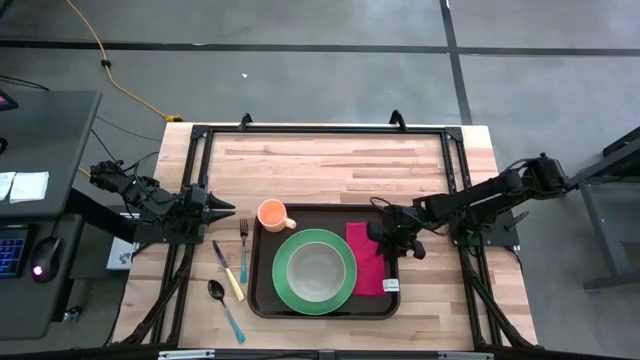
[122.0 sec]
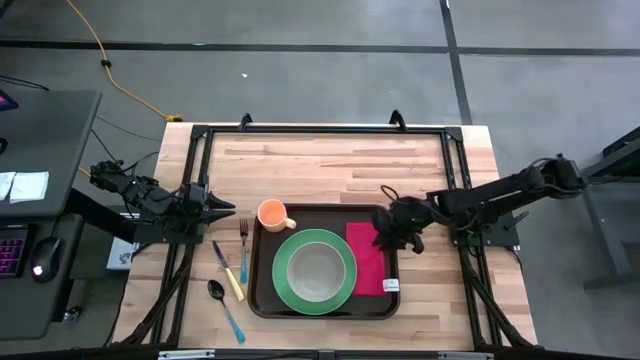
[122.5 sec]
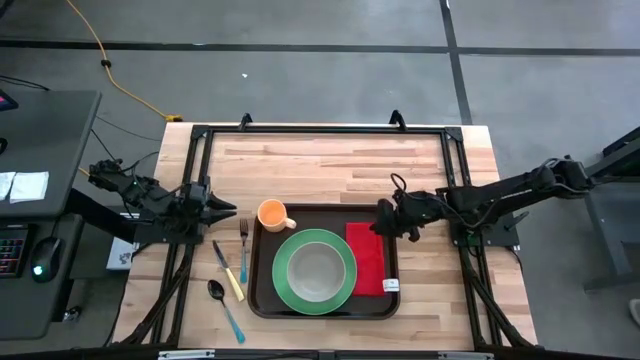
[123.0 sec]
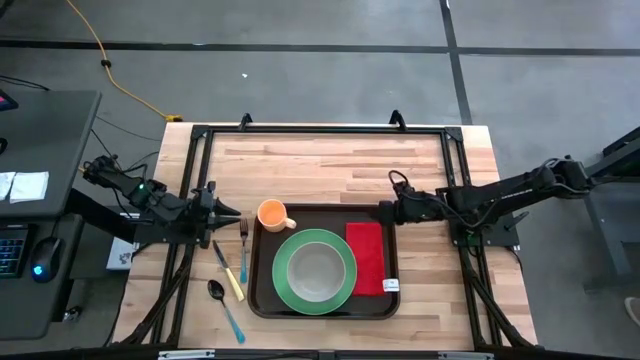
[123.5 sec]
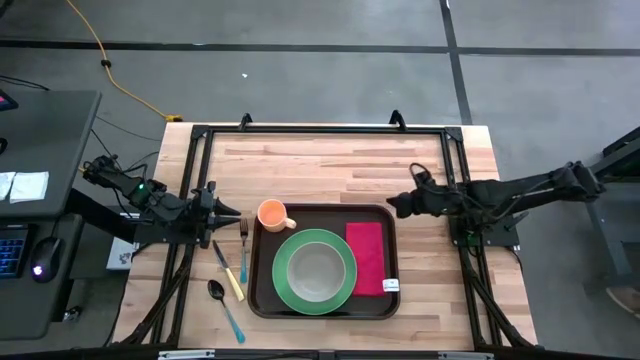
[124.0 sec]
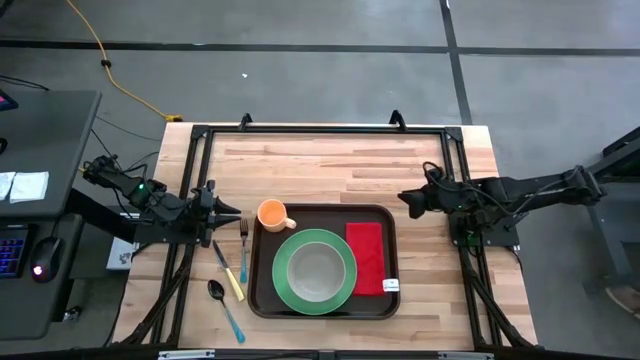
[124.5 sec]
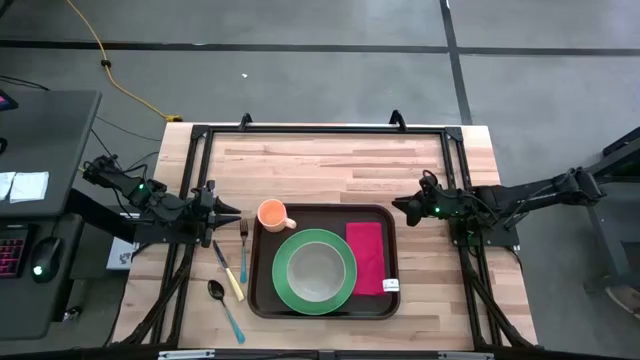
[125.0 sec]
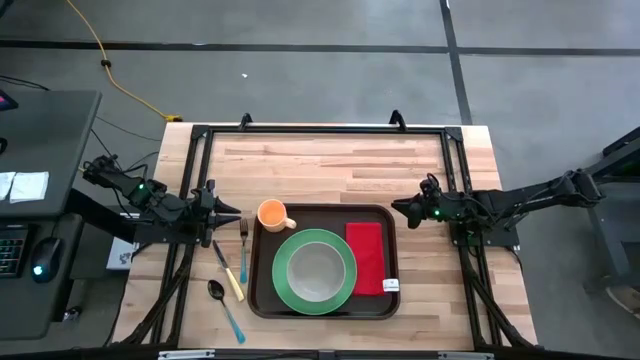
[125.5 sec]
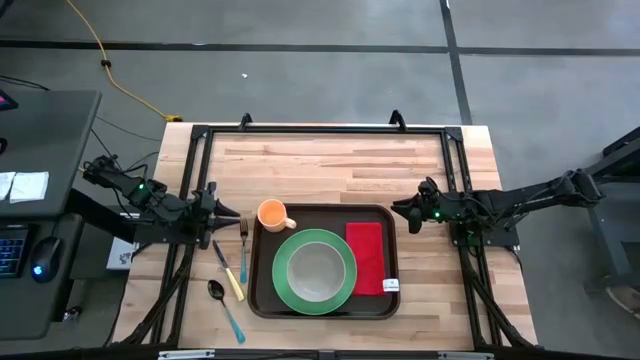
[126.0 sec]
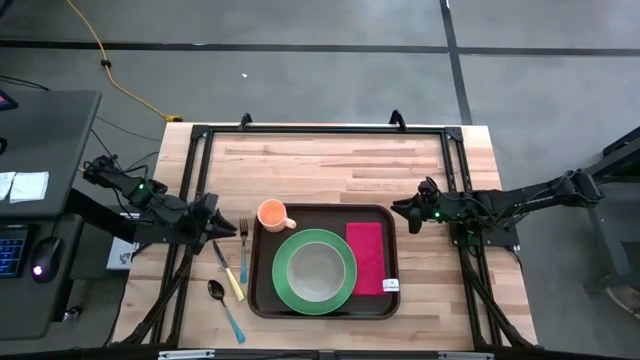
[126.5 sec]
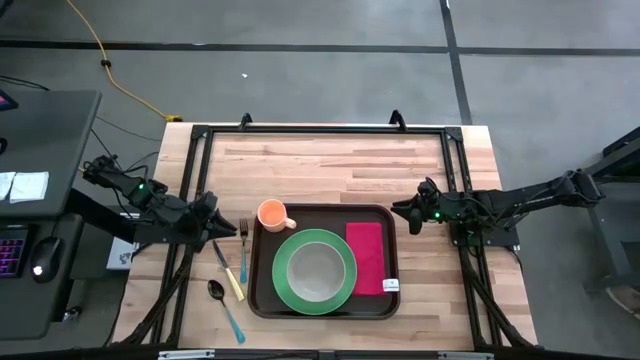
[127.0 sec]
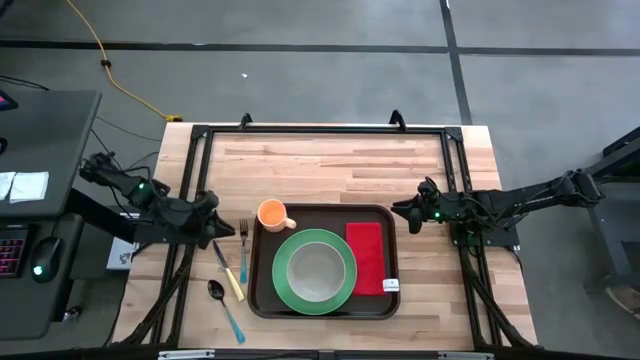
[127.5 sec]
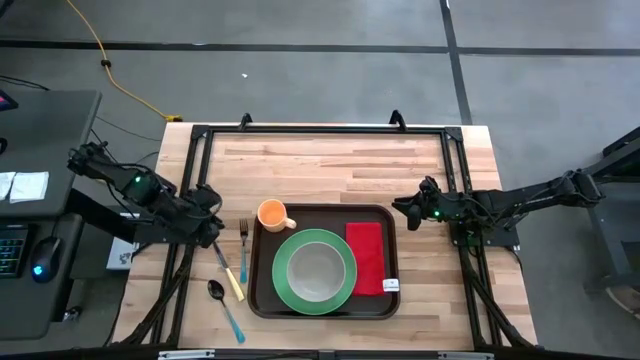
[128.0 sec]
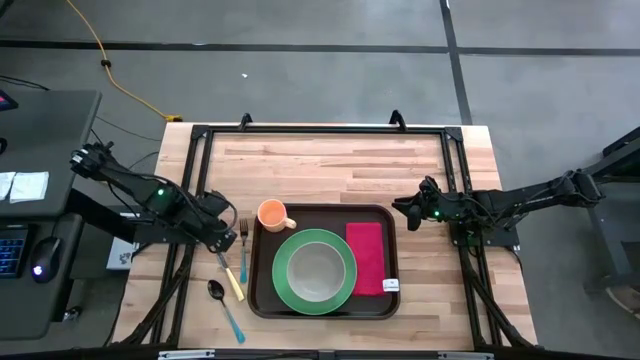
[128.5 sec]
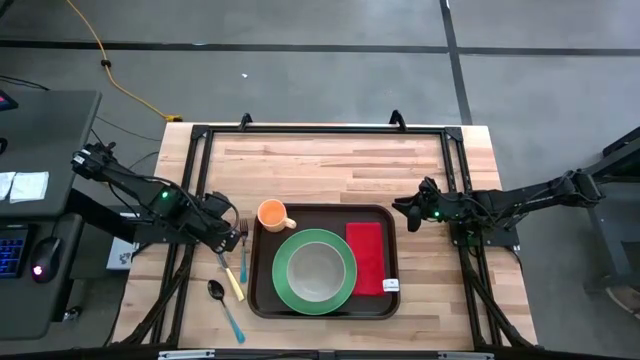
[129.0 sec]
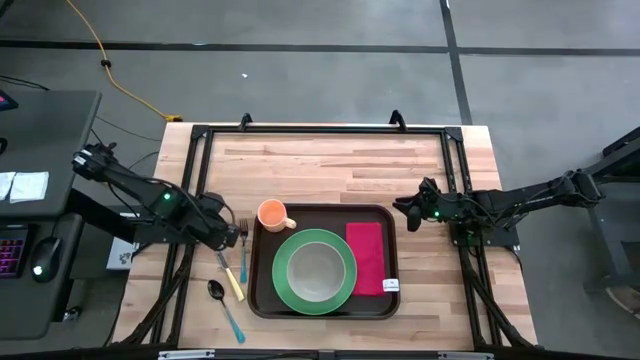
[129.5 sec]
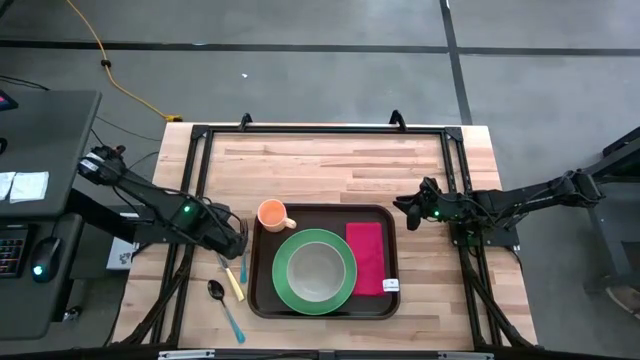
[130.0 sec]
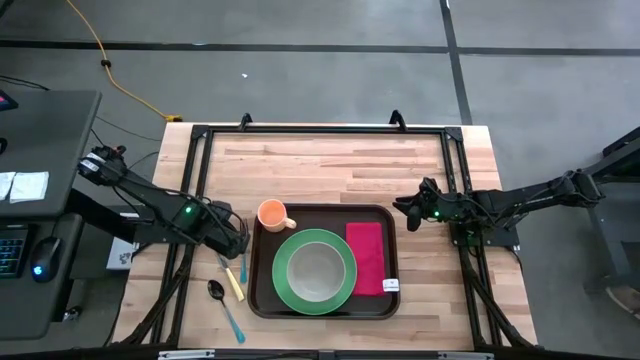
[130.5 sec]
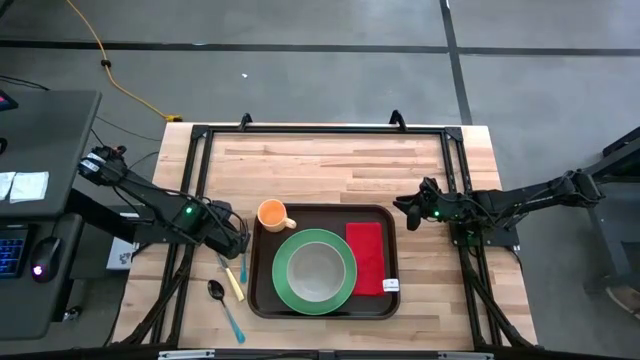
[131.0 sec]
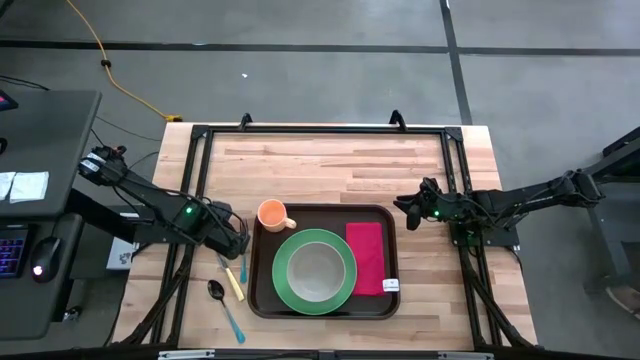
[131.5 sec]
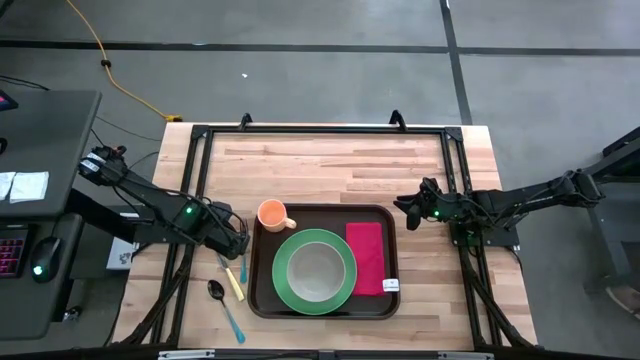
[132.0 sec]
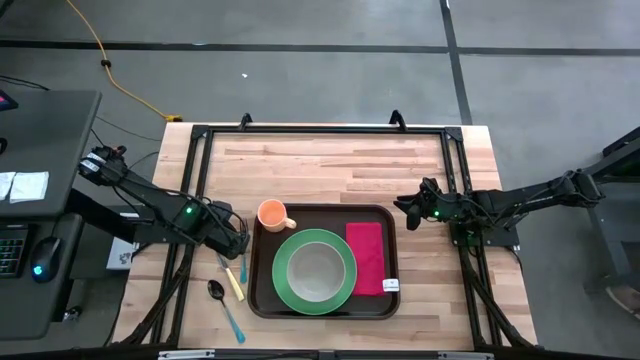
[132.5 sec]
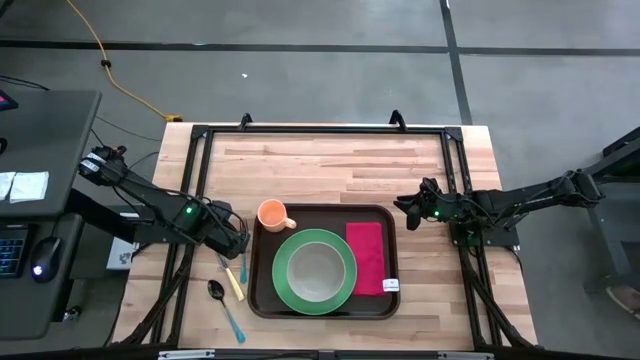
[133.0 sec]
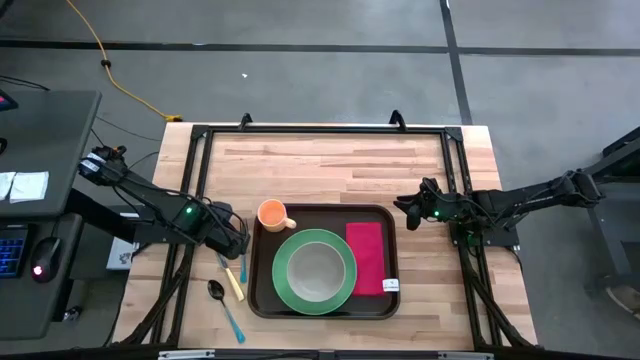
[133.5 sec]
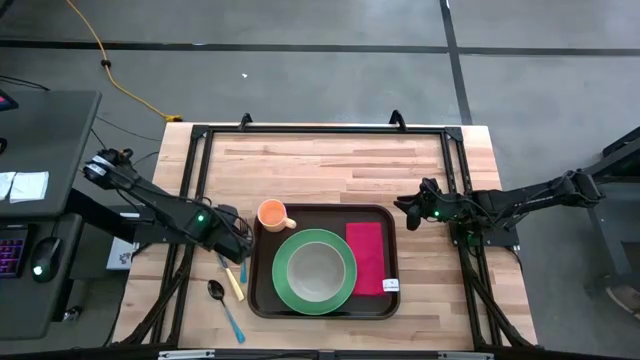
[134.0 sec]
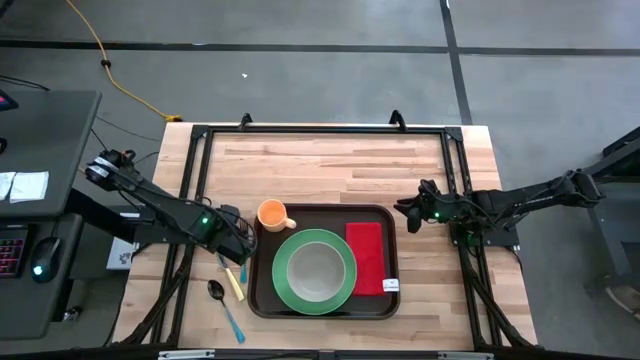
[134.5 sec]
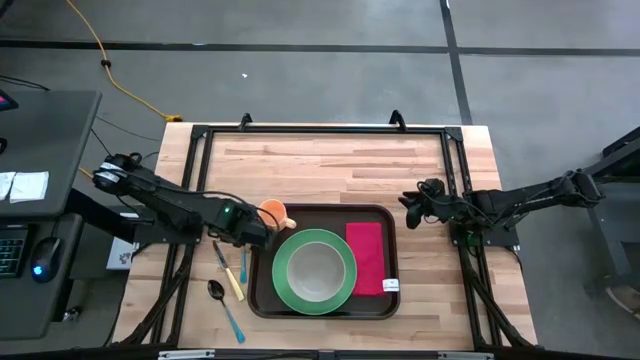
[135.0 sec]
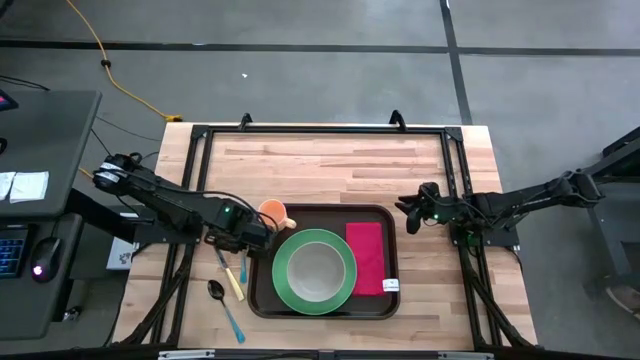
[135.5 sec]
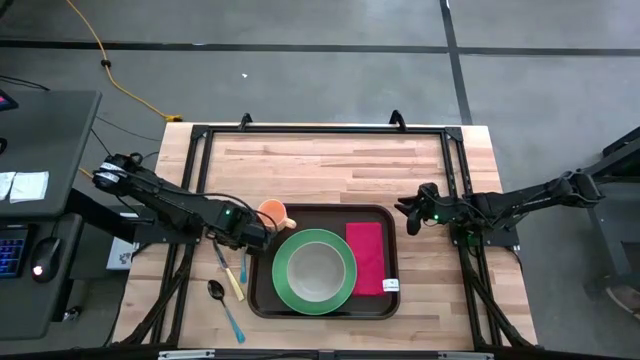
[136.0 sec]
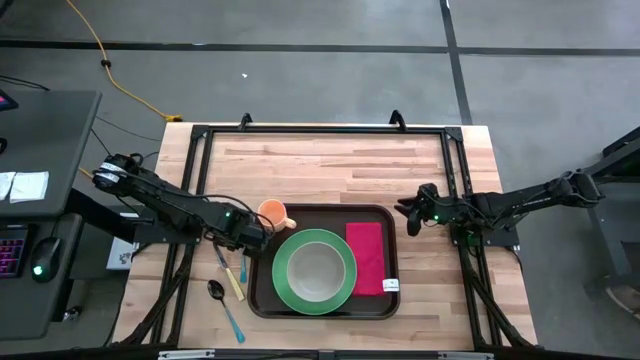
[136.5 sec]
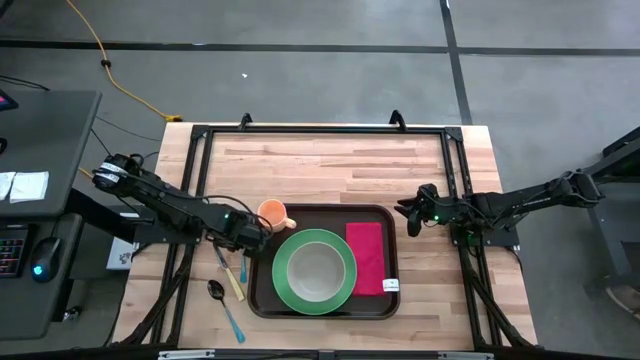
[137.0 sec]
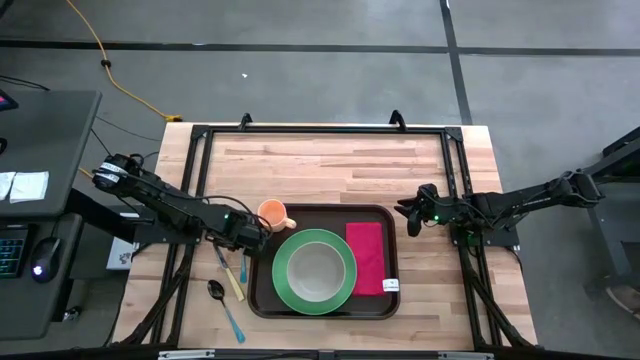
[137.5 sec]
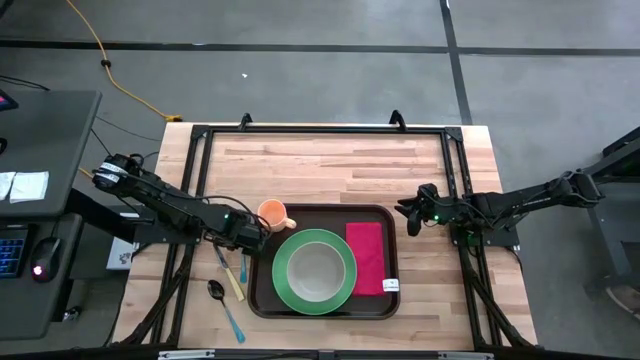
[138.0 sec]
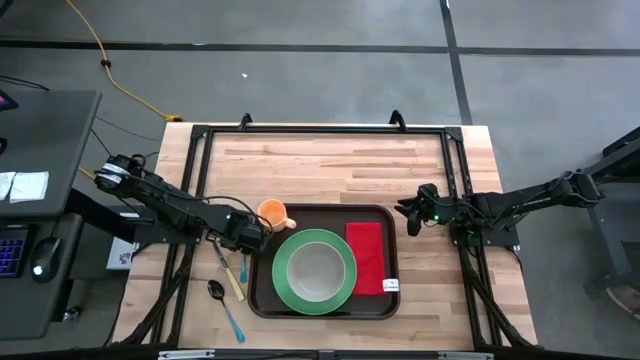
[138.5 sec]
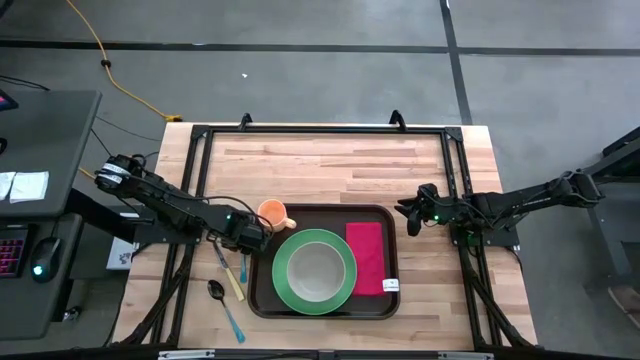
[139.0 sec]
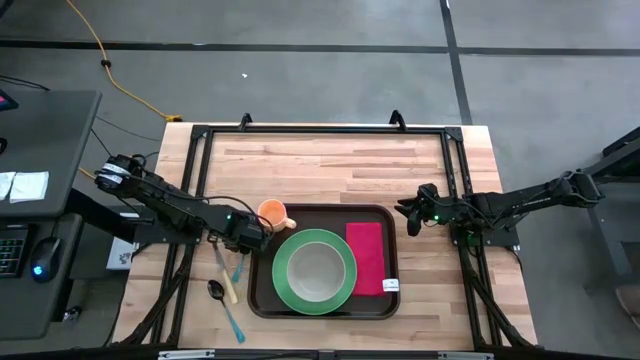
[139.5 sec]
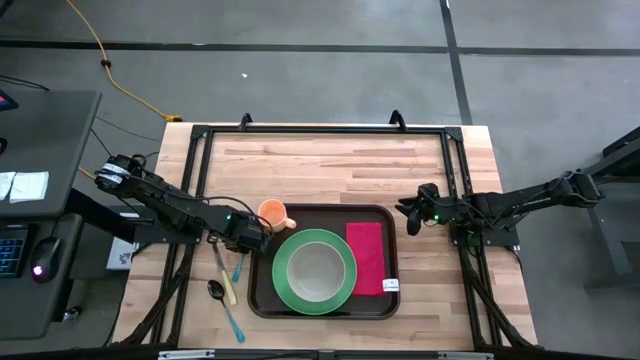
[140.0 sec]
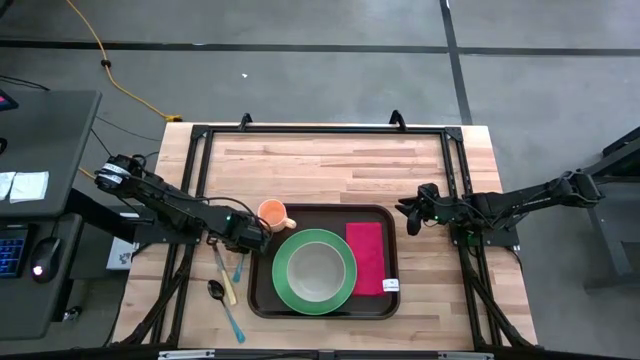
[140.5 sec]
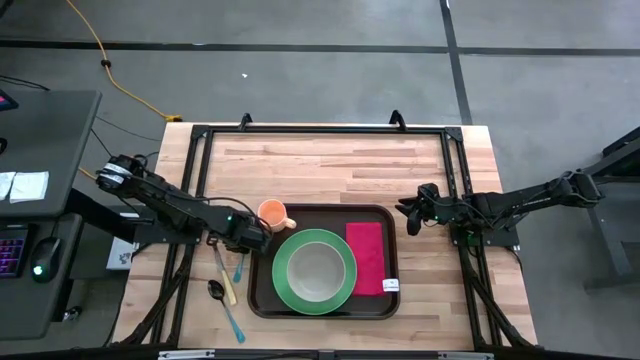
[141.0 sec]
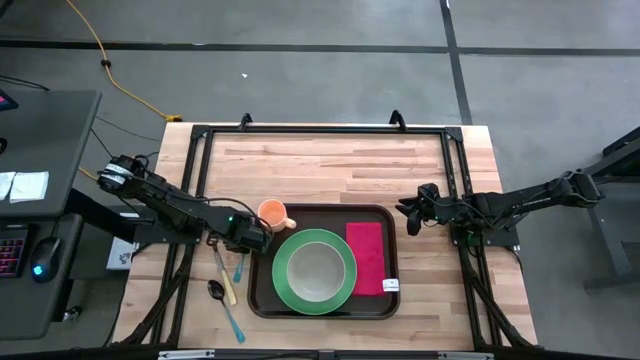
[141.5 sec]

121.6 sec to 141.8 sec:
Task: Set up tray
Put the blue fork on the red table napkin

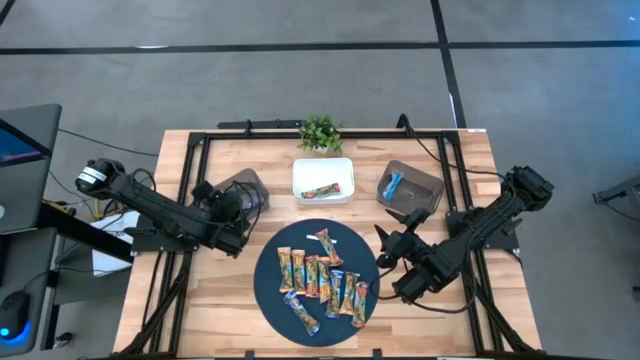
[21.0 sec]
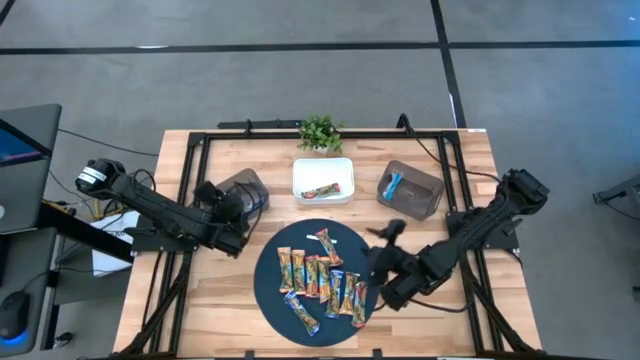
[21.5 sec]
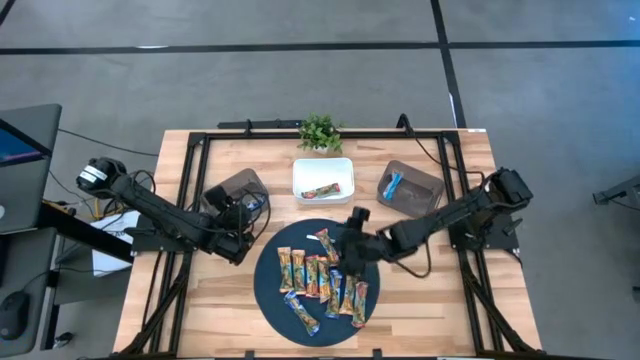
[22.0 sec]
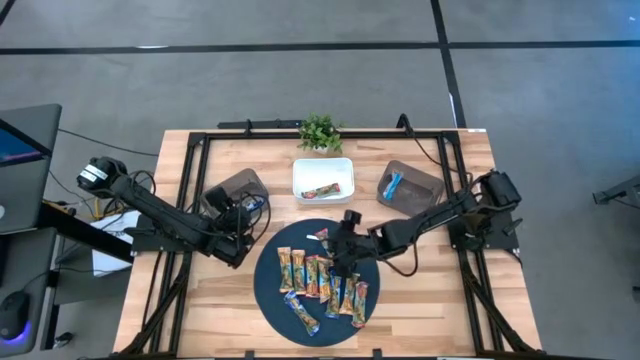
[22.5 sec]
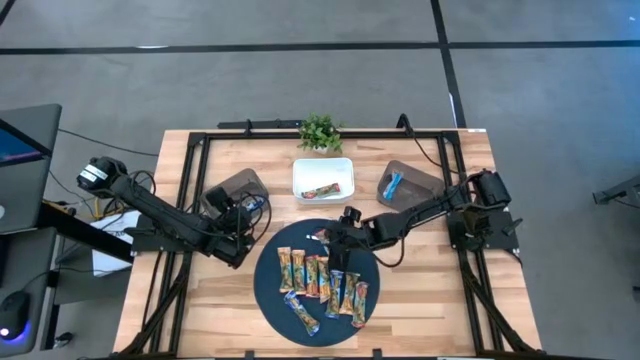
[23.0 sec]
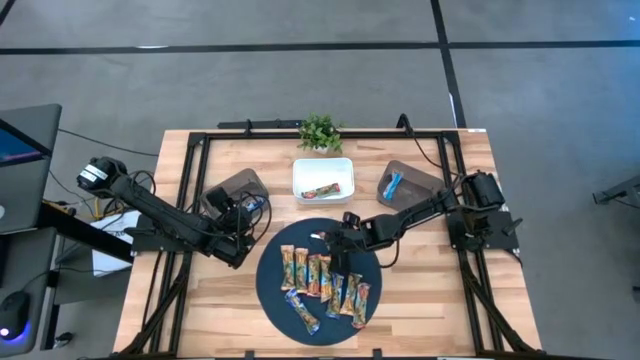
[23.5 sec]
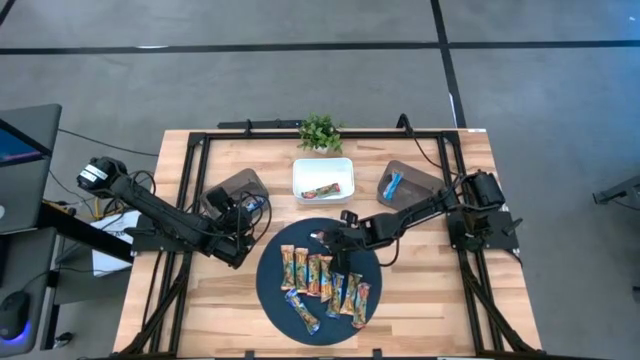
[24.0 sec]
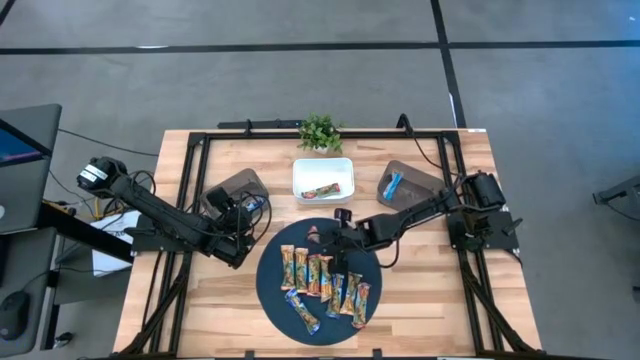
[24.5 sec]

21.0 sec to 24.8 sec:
Task: Pick and place Granola Bars by type
Put the red granola bar into the white bin
